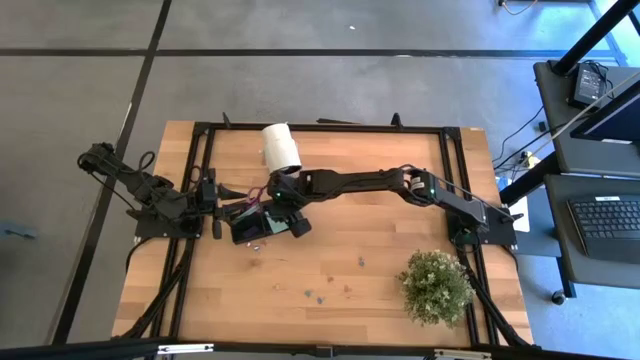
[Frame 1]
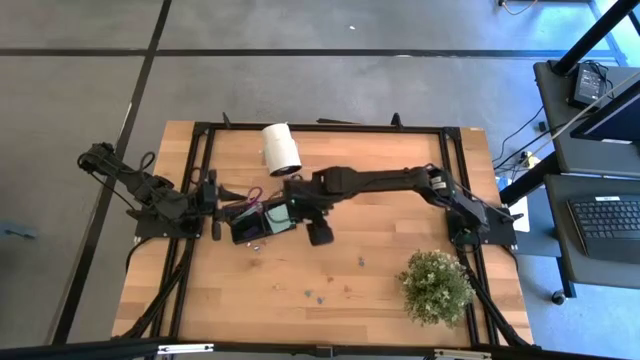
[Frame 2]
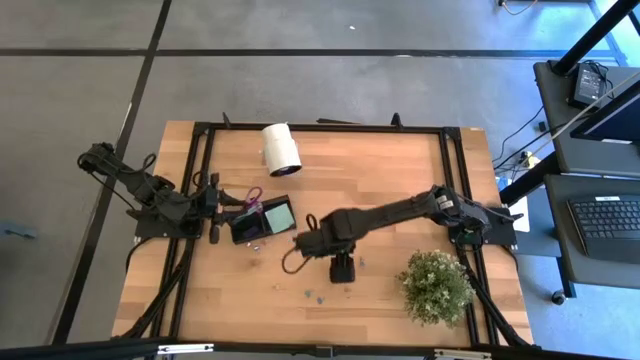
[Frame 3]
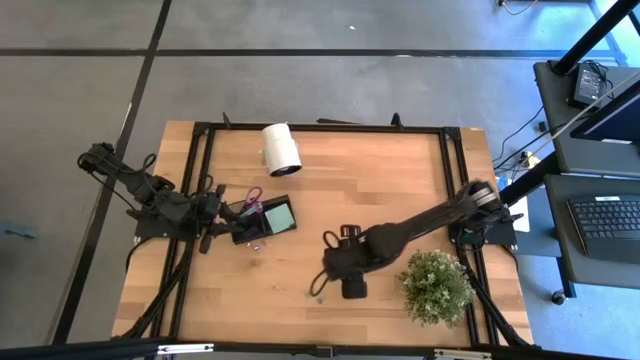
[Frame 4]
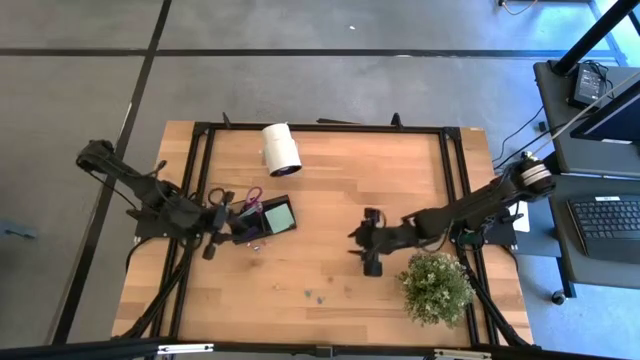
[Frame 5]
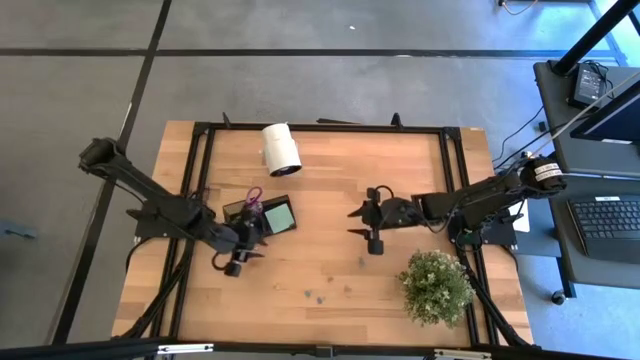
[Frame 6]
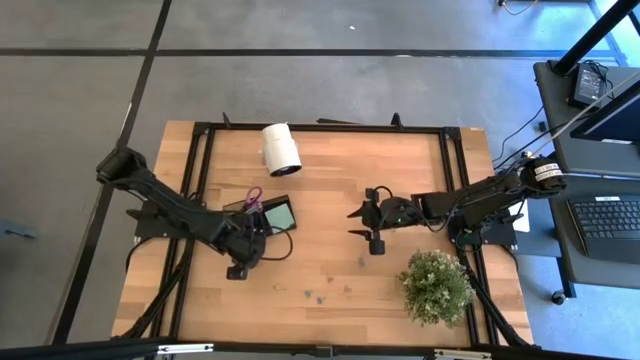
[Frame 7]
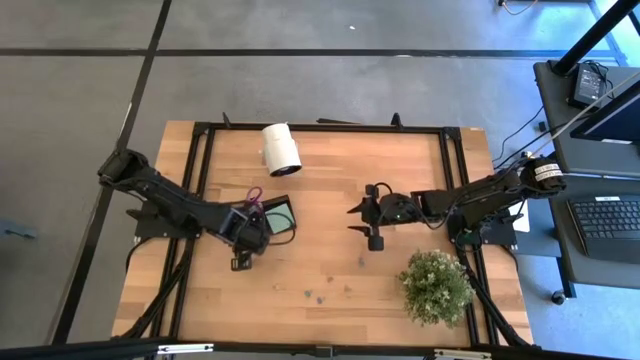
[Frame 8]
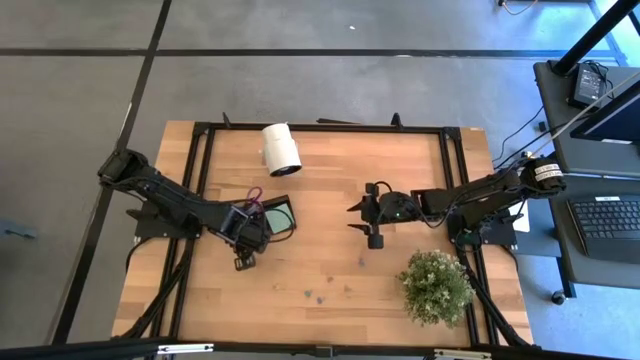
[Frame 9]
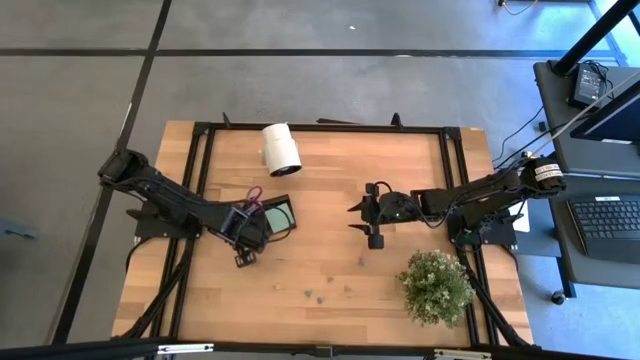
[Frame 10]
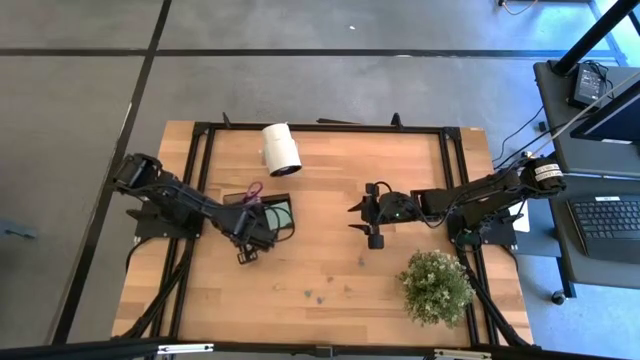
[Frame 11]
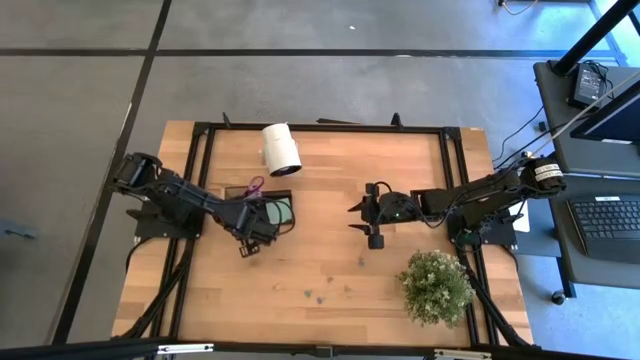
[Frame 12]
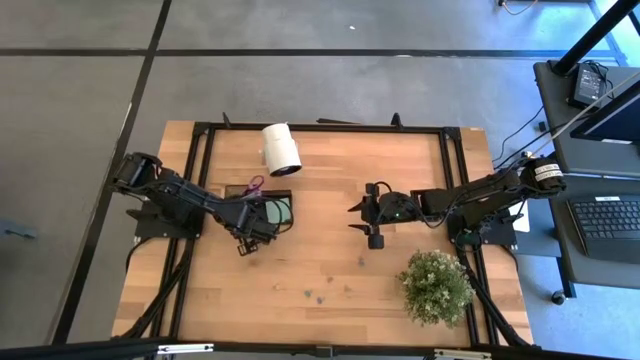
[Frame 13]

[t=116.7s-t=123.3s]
Task: Pick and place office supplies into organizer
Adjust the black desk organizer

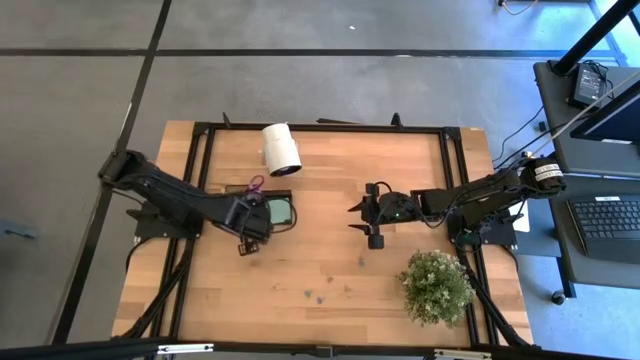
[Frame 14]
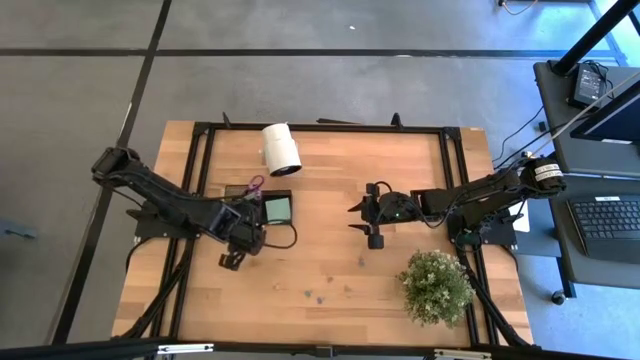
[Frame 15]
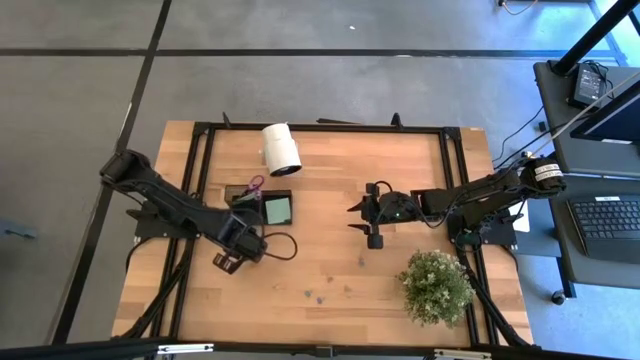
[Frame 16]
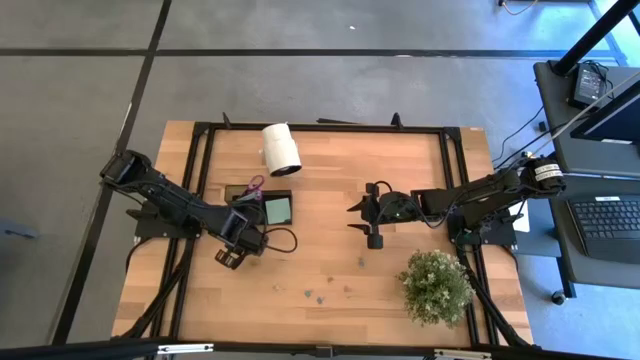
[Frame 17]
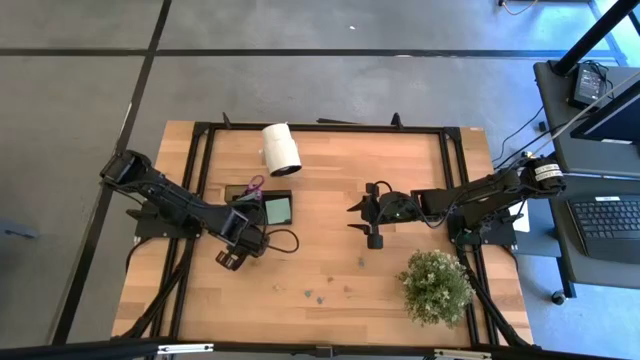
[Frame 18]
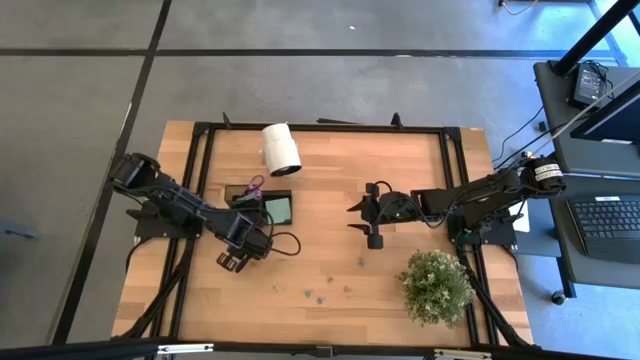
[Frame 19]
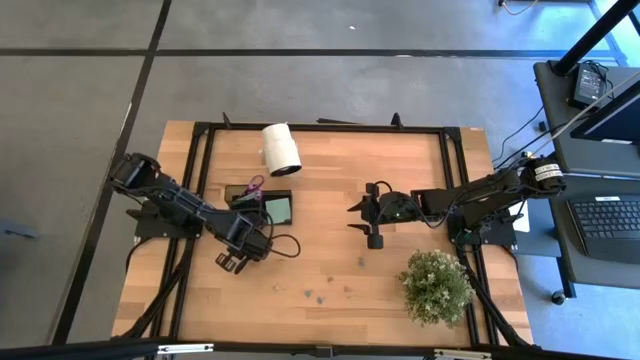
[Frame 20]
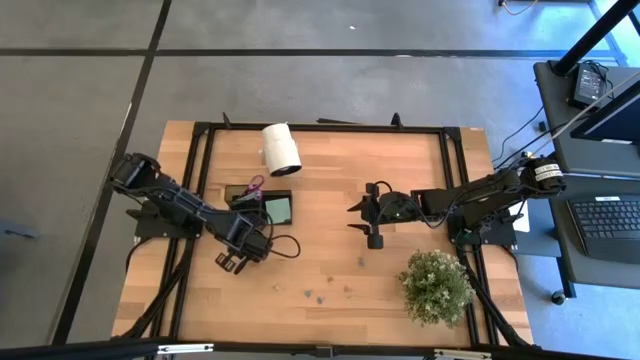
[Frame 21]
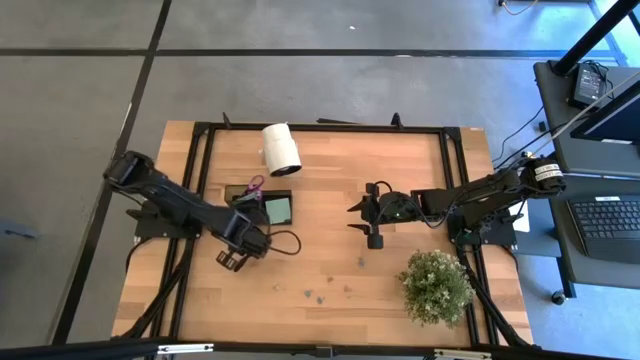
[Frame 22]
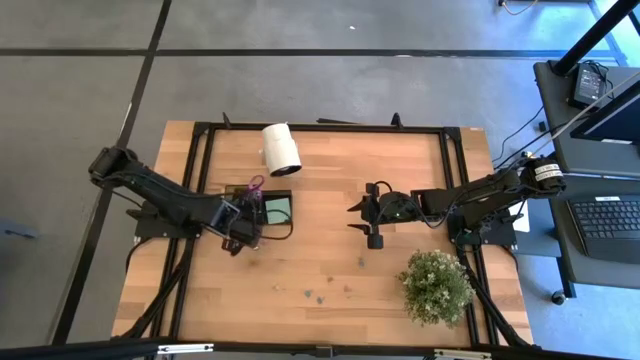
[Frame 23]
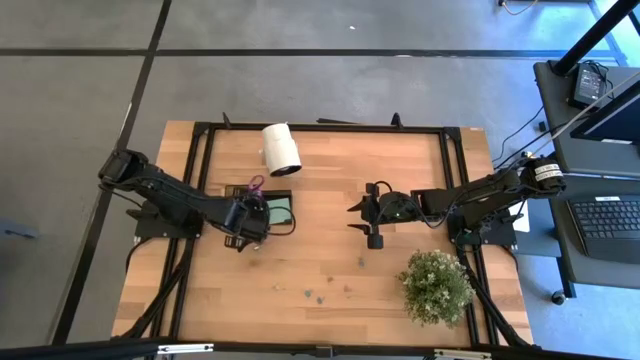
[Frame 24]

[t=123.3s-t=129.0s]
Put the pink binder clip into the black desk organizer

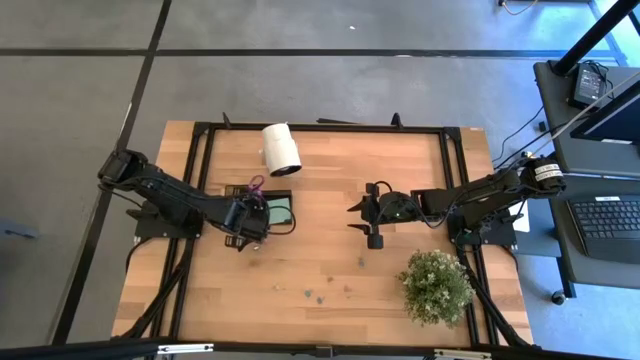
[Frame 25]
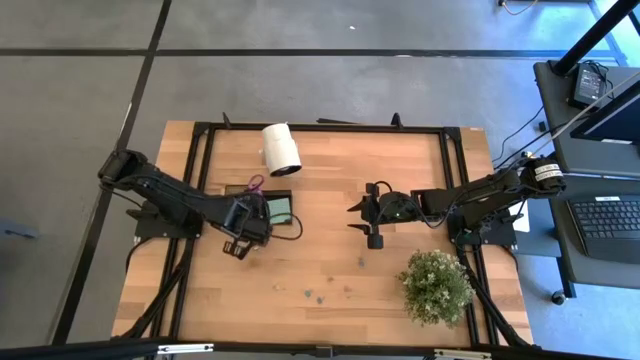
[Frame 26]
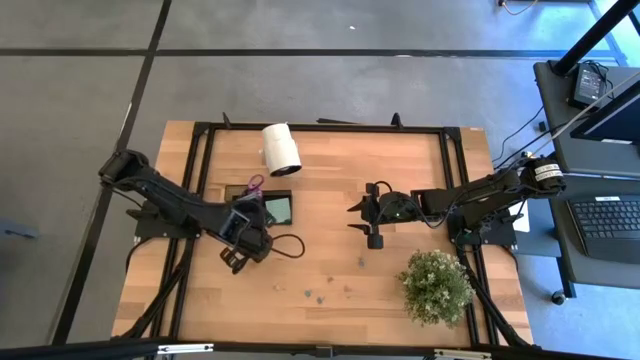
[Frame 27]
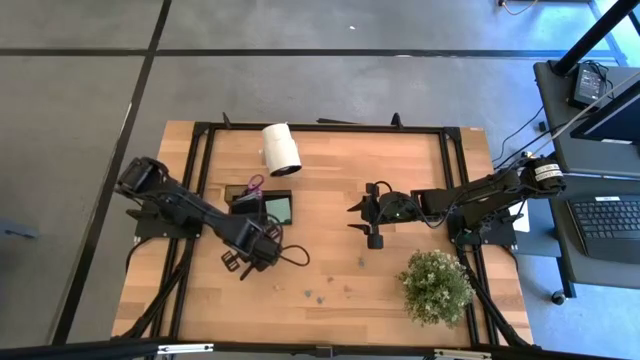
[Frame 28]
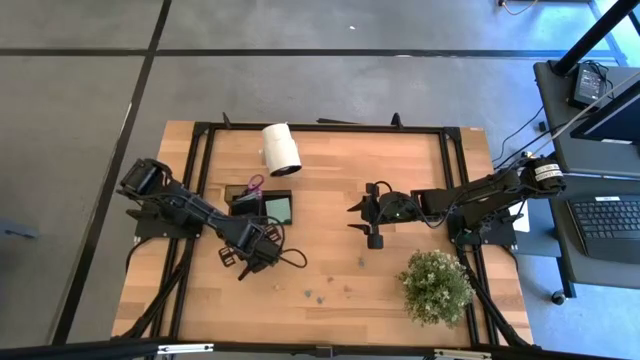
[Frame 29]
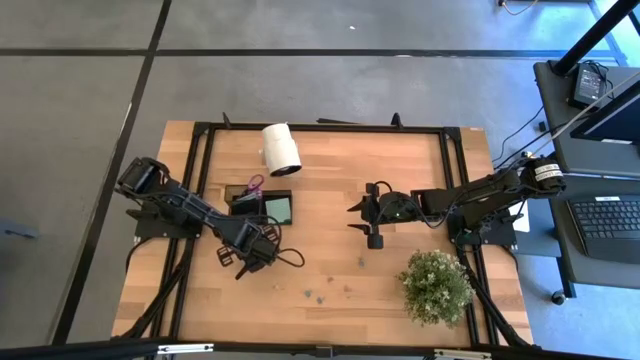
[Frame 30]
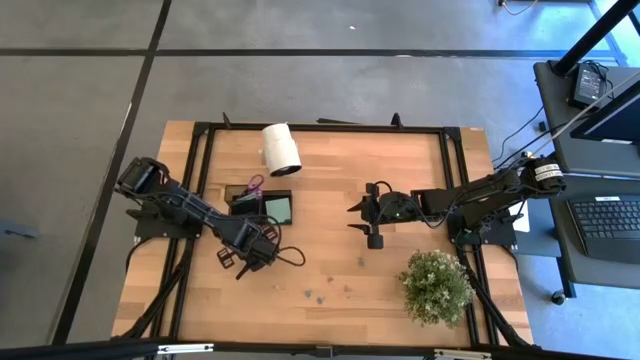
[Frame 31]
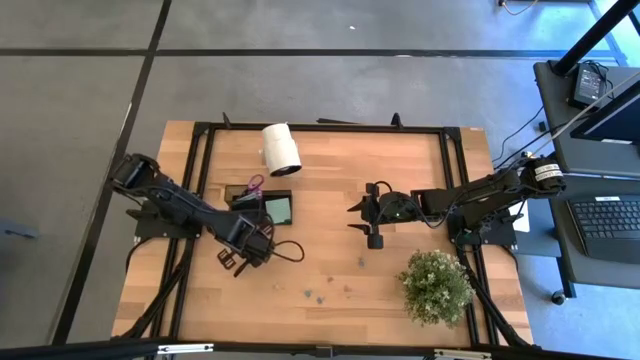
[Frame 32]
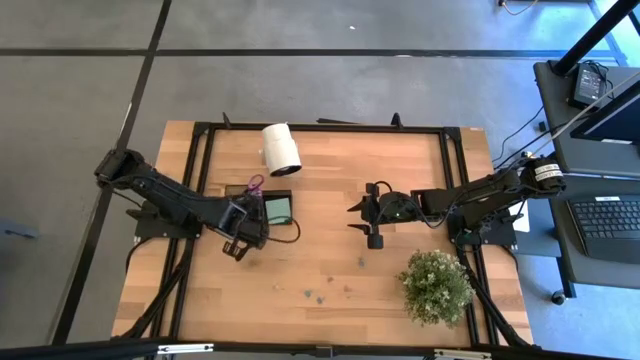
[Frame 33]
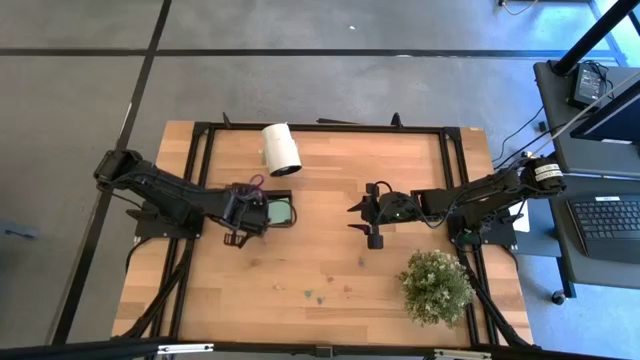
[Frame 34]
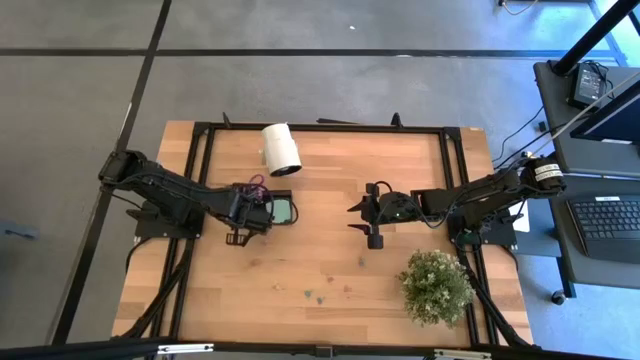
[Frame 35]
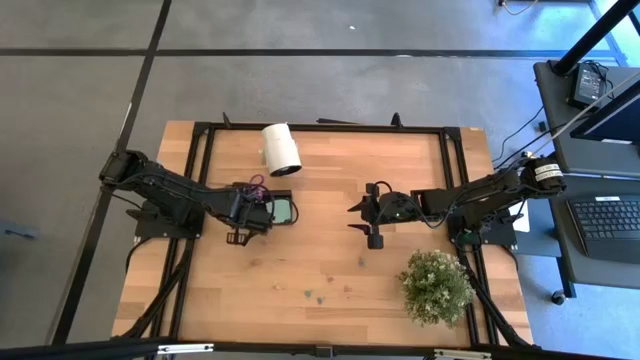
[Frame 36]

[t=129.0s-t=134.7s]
Put the blue binder clip into the black desk organizer

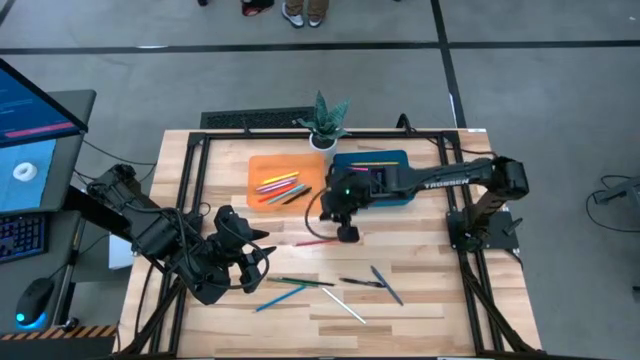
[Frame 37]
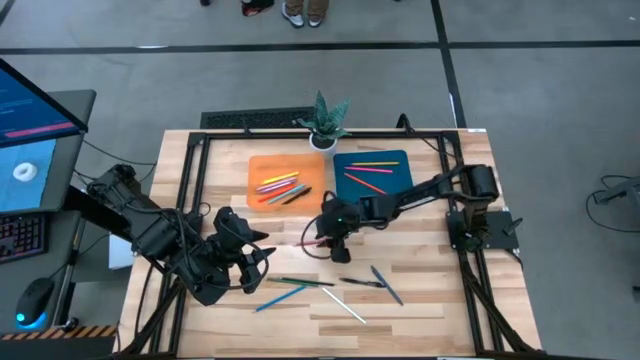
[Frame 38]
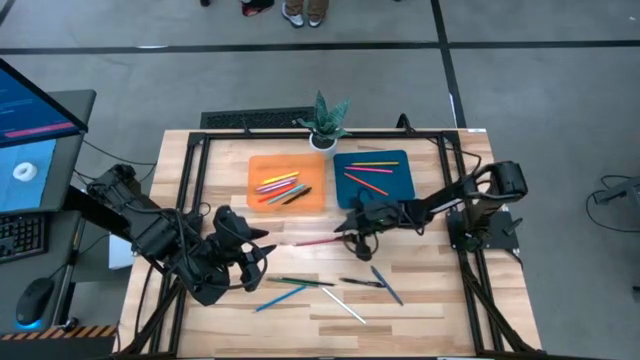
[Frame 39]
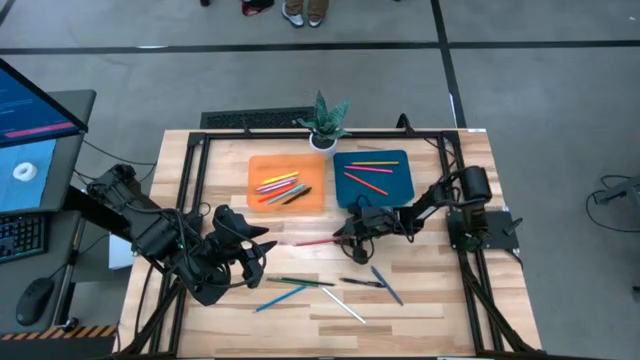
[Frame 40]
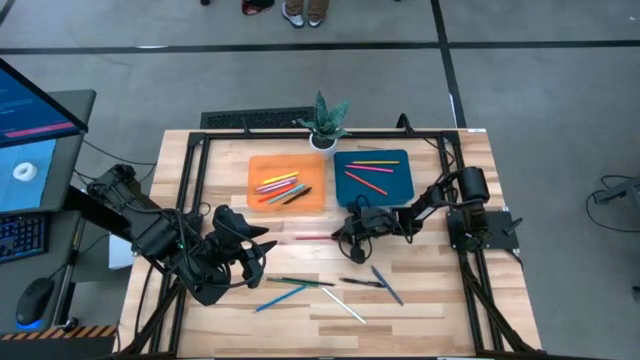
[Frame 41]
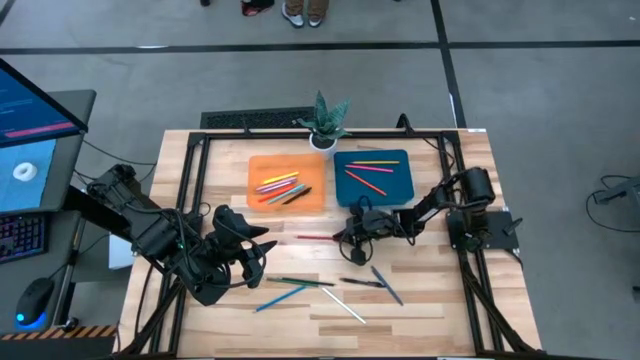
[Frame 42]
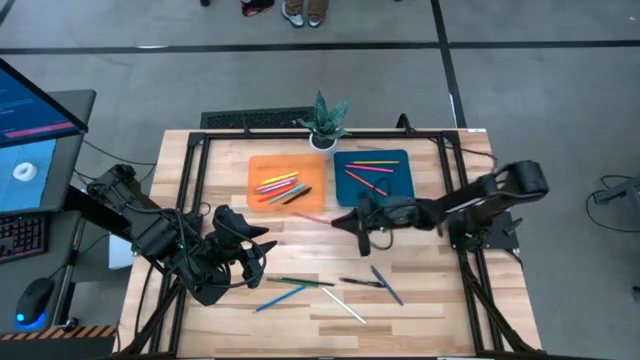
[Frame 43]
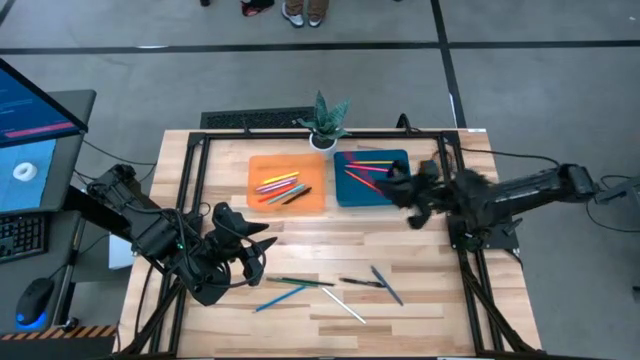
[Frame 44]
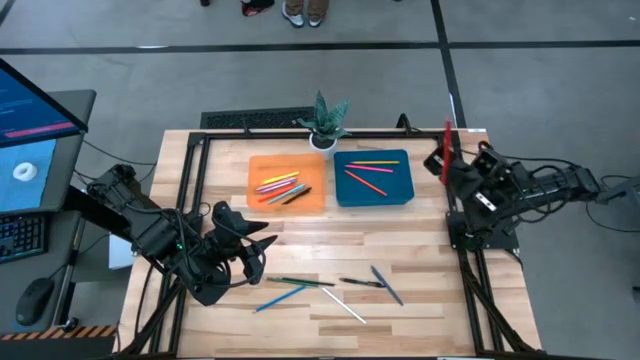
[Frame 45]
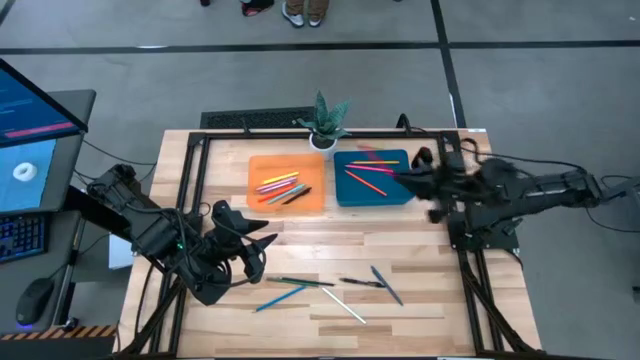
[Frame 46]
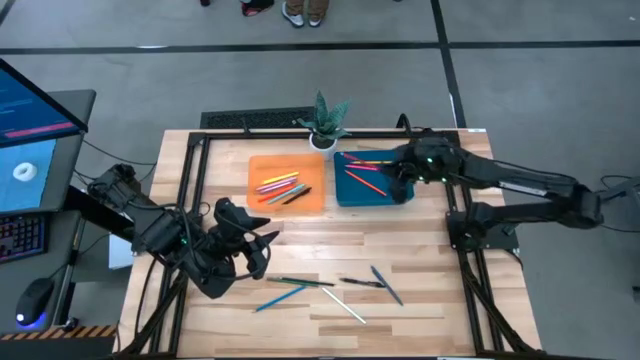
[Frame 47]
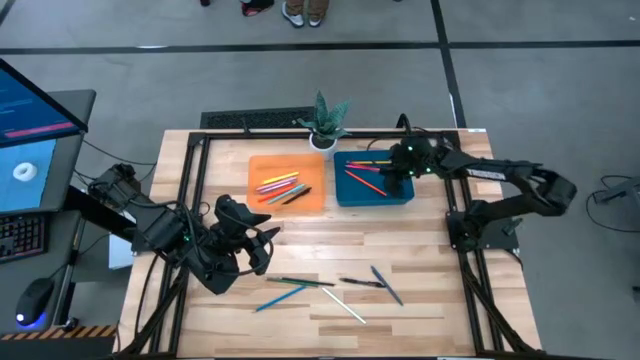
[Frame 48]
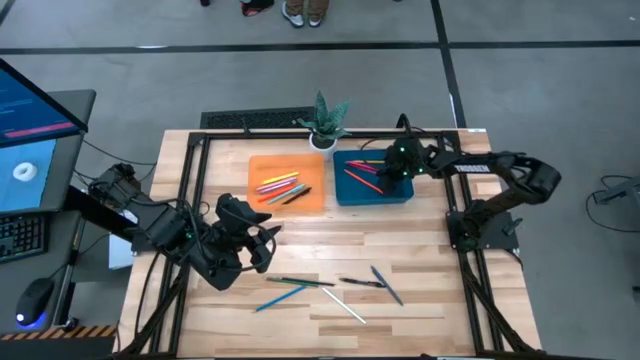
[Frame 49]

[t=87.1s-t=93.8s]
Task: Sort pens & pencils
Put the red pencil into the blue bin
